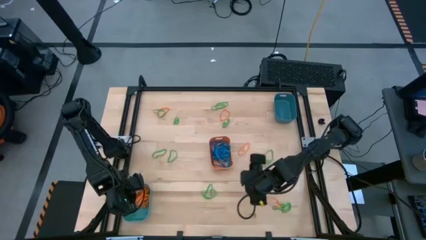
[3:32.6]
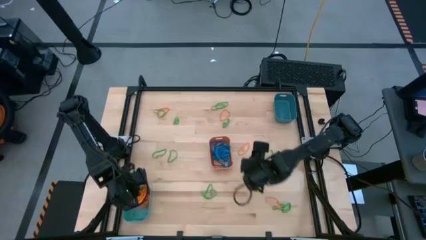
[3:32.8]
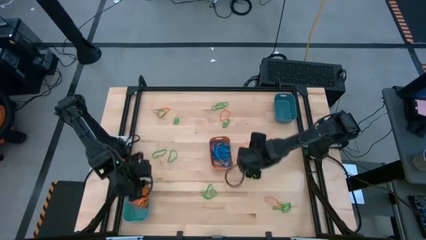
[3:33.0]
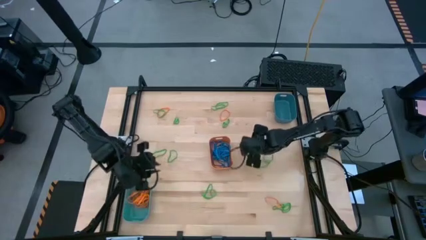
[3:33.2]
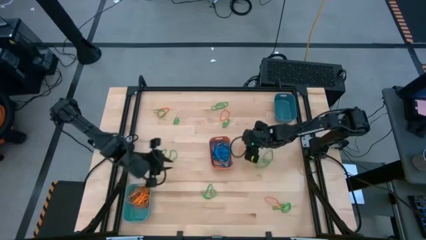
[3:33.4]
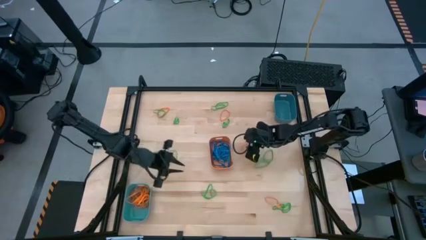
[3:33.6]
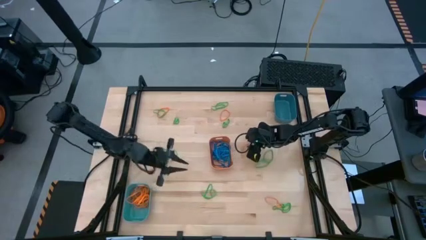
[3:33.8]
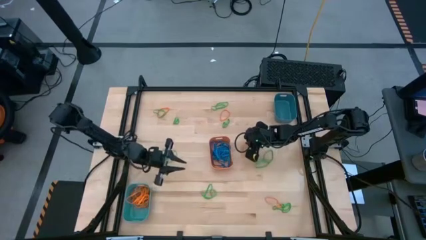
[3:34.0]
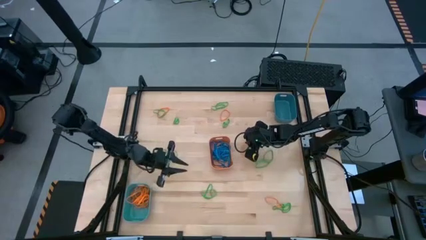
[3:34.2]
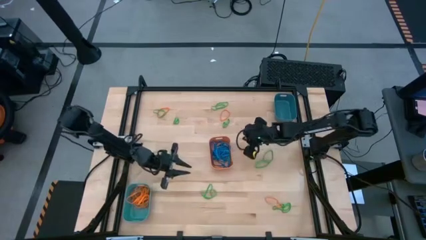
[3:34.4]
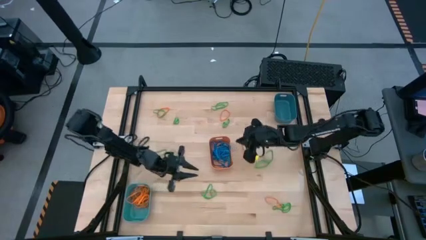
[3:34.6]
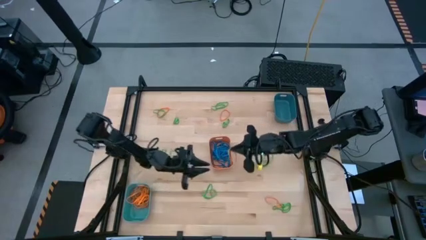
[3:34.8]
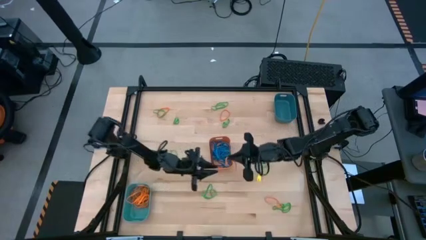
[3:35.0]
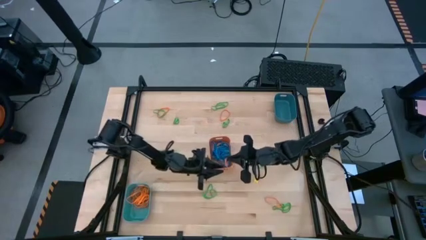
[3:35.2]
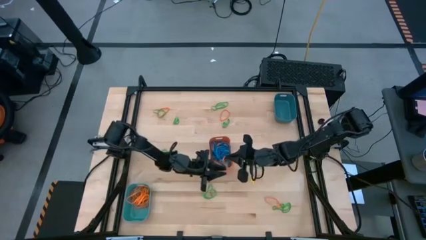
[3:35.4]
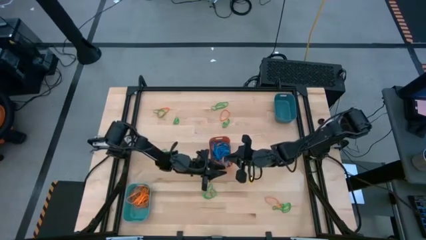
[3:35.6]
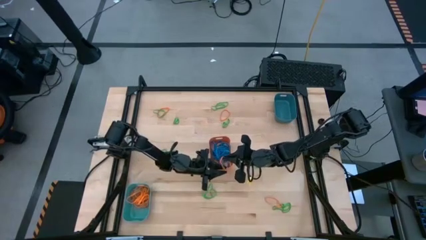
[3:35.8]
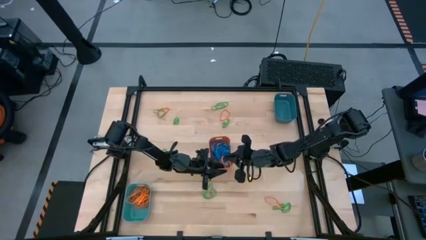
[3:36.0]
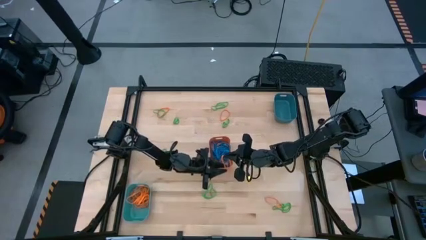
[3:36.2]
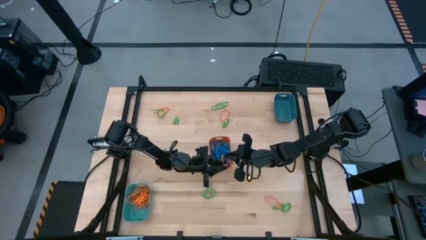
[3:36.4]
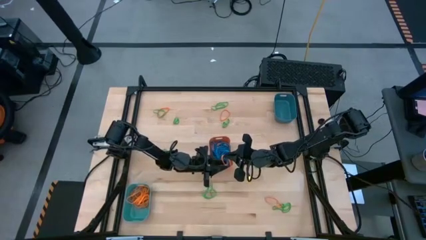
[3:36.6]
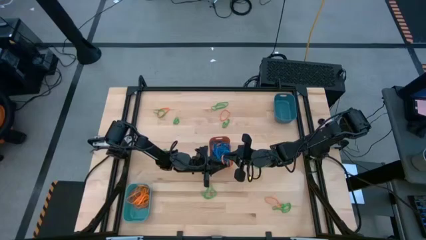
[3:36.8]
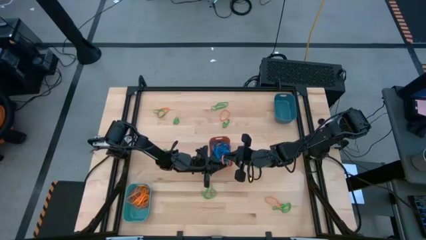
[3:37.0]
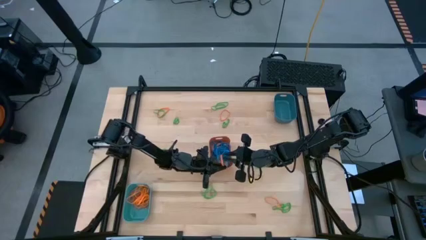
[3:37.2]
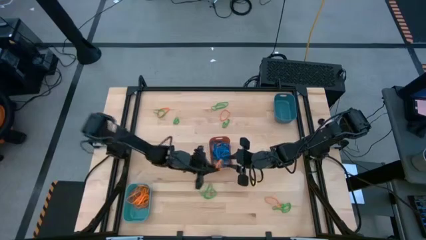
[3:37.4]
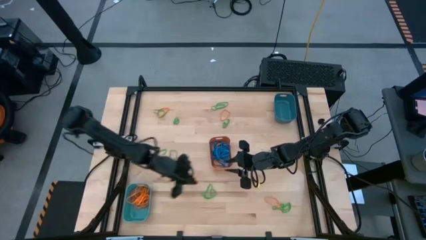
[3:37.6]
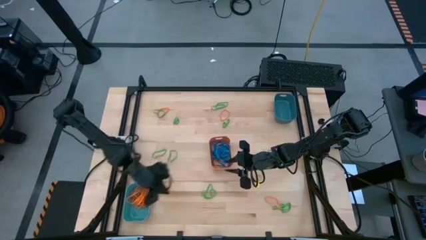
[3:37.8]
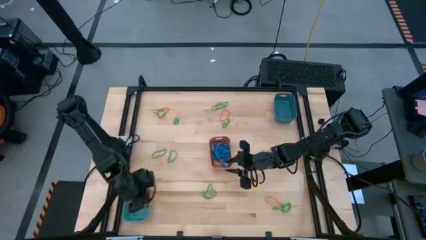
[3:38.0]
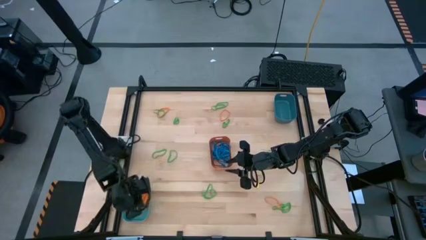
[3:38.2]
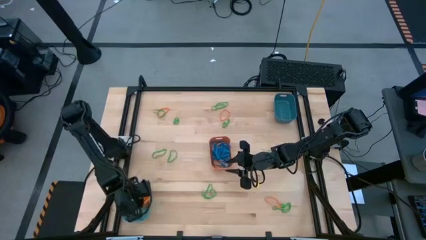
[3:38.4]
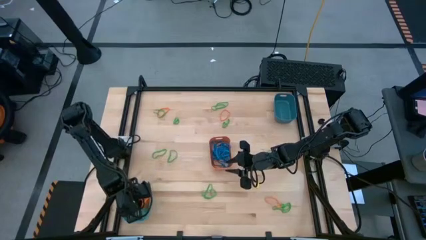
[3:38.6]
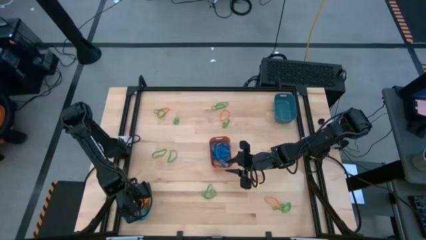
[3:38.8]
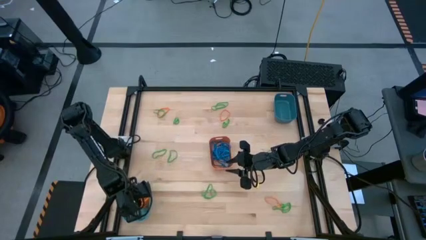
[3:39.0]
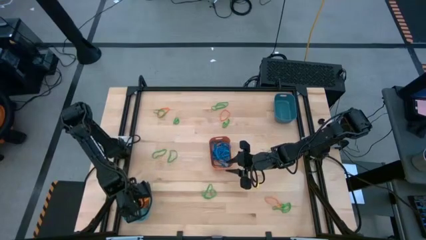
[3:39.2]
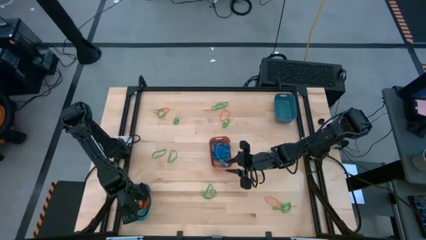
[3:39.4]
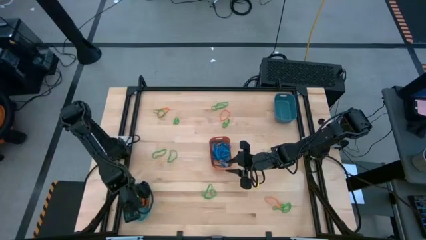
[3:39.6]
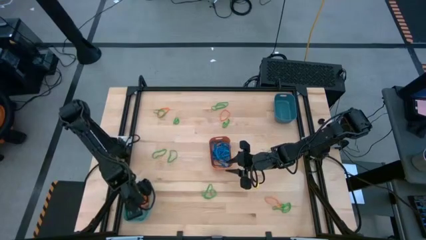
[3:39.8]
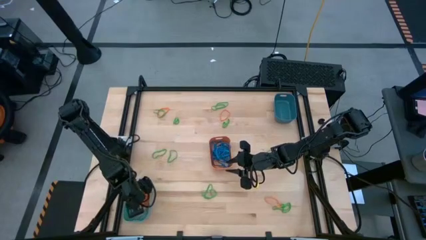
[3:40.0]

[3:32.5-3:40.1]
Task: Sort rubber bands into baskets
Put the orange rubber band into the green bin

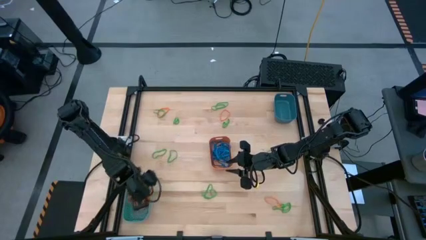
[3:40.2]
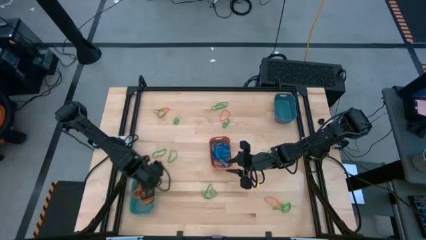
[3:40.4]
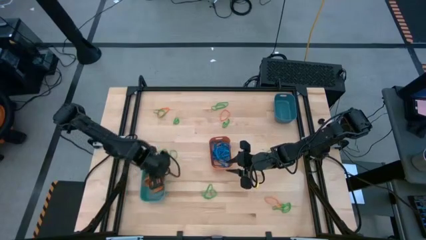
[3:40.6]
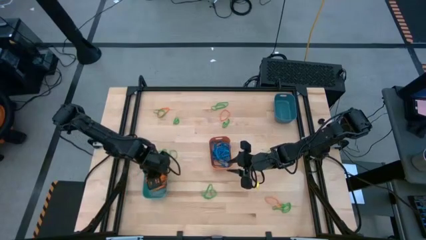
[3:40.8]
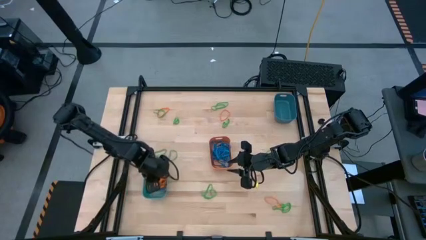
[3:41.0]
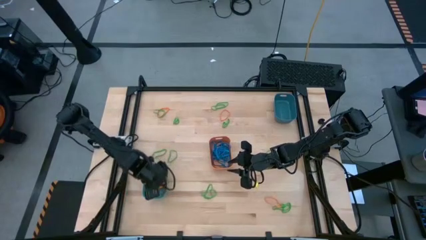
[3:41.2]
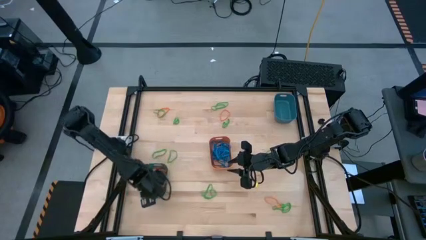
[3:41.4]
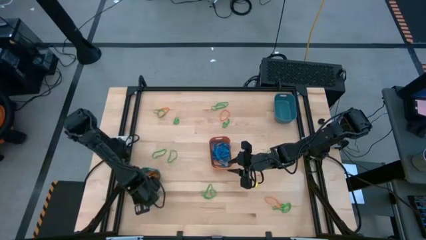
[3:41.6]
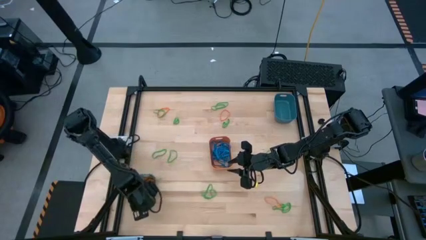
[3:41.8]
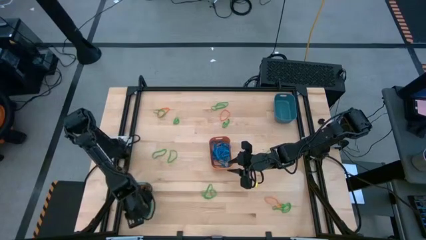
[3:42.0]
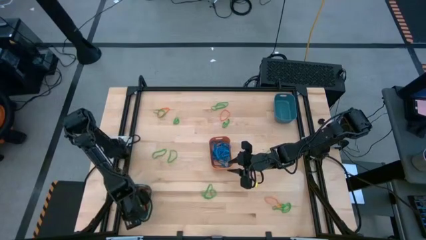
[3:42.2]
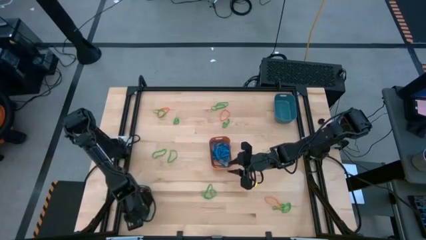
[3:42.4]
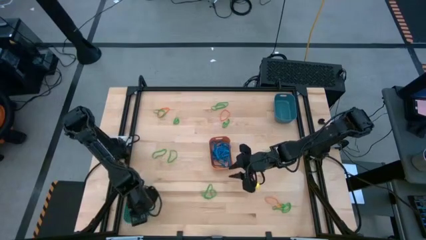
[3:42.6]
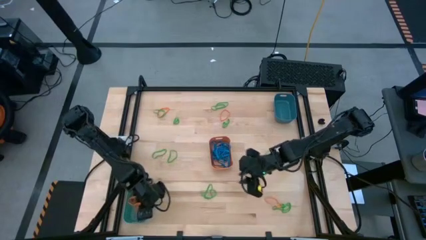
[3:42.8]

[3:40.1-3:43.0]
Move the green bin to the bottom left of the table

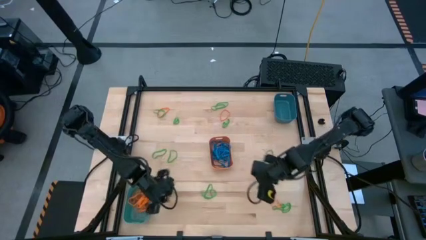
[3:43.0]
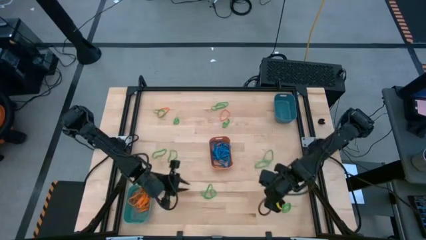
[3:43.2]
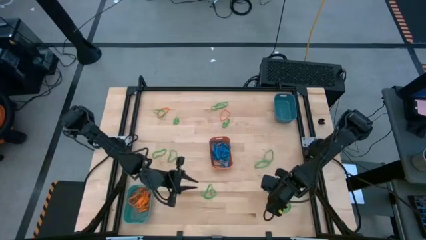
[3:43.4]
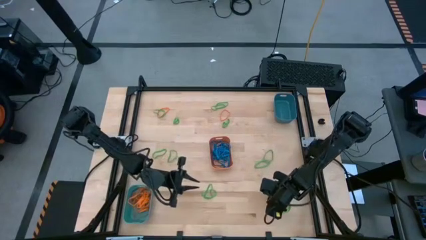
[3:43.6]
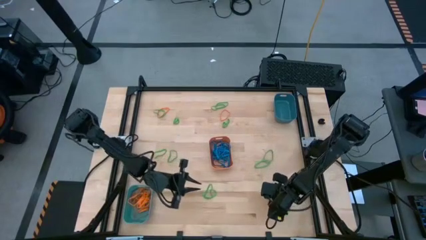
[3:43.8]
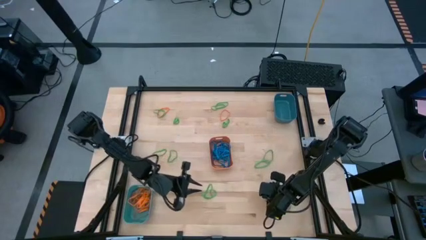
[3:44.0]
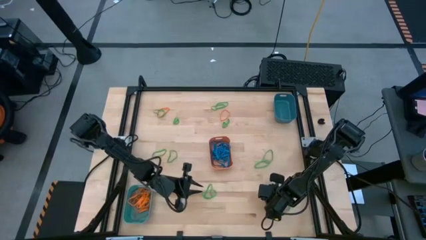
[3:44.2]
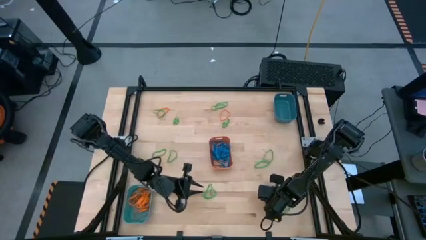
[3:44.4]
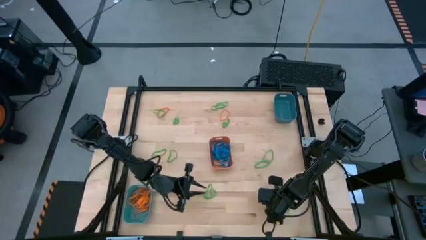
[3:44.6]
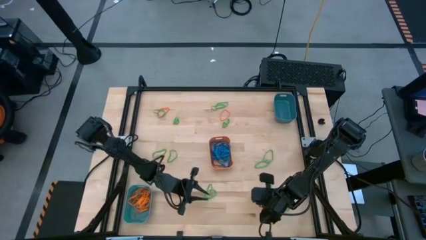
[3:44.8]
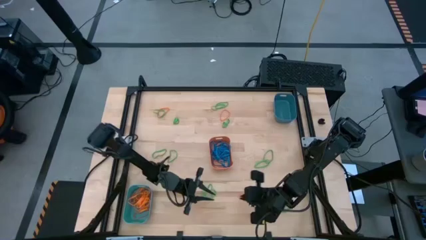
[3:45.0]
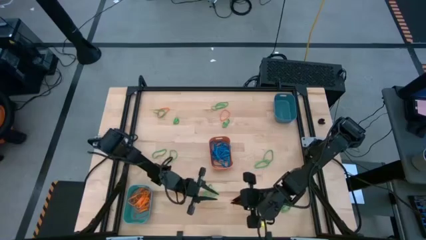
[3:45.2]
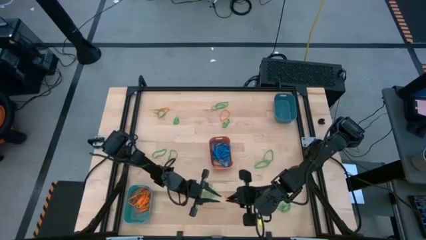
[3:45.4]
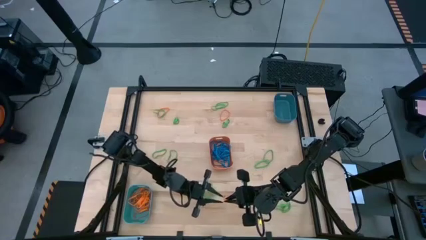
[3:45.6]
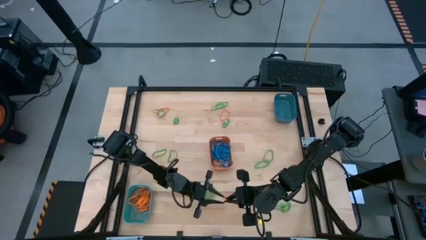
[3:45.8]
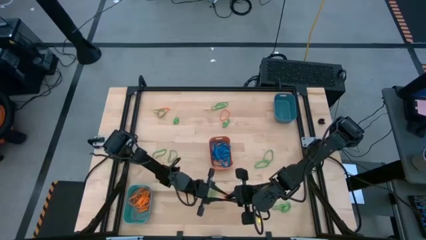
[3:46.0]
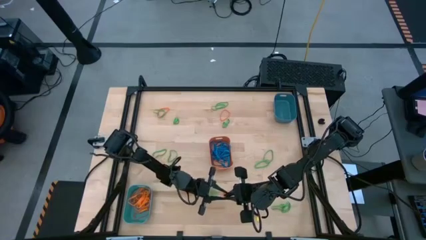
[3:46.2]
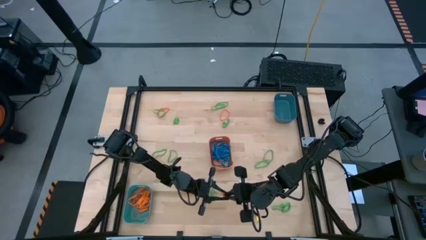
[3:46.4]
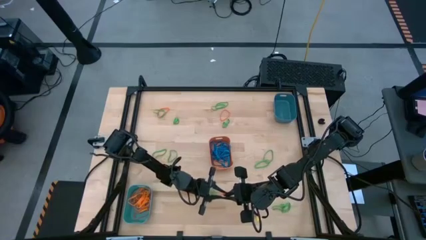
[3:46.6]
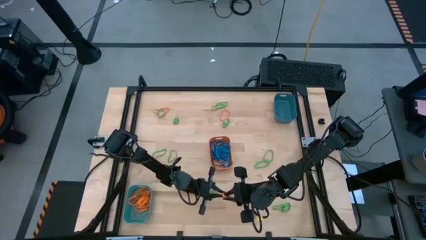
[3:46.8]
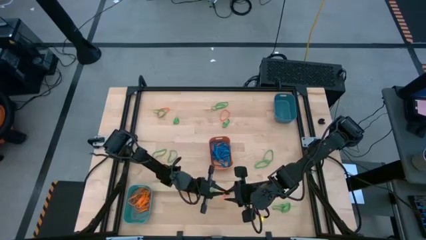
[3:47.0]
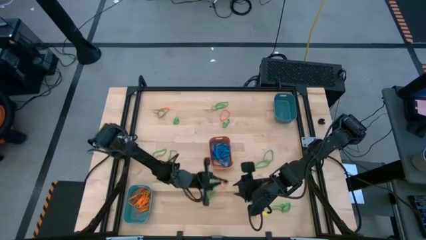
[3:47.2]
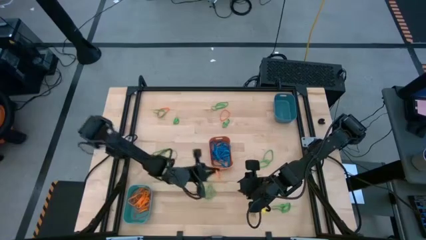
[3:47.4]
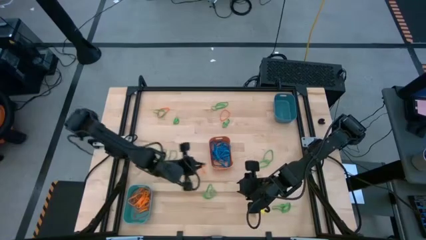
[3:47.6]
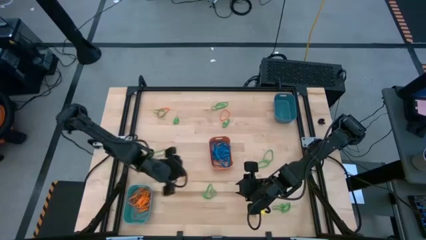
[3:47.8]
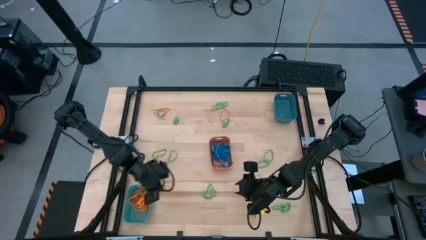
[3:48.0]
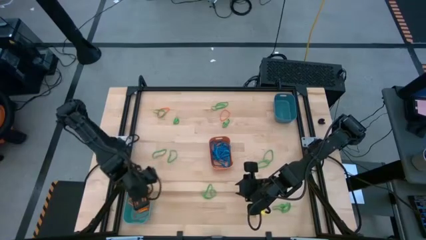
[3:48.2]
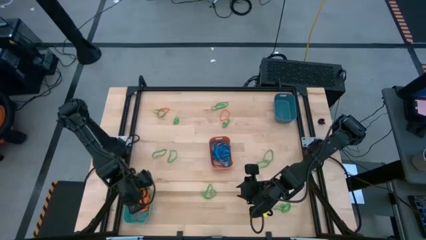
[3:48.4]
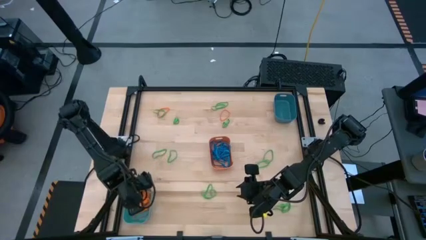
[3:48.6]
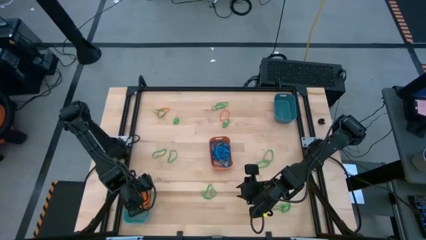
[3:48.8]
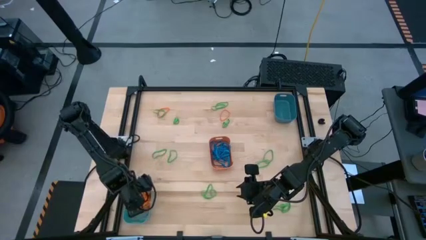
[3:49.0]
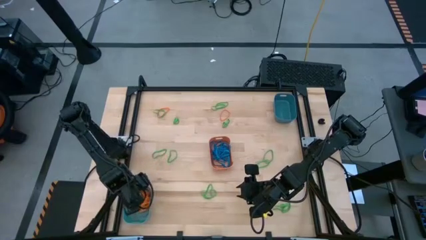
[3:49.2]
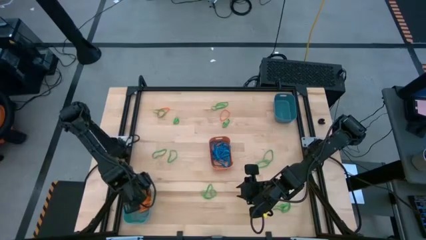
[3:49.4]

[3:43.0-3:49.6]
Put the orange rubber band into the green bin
